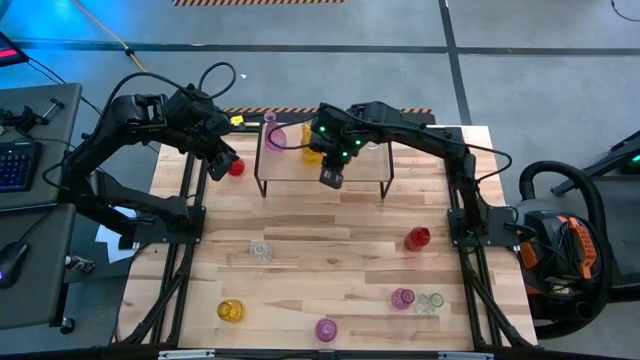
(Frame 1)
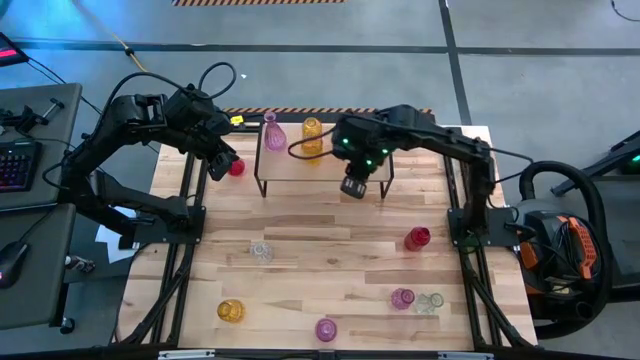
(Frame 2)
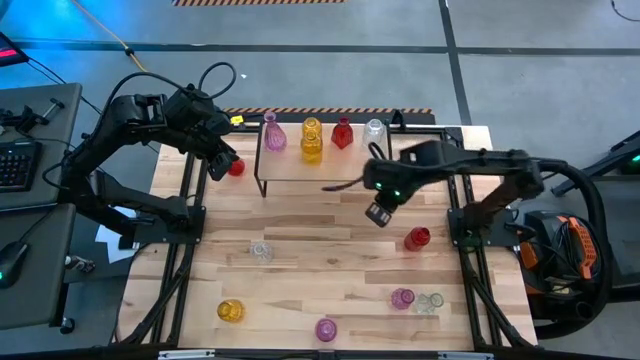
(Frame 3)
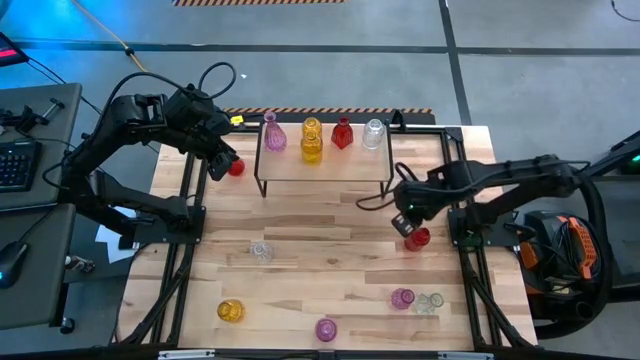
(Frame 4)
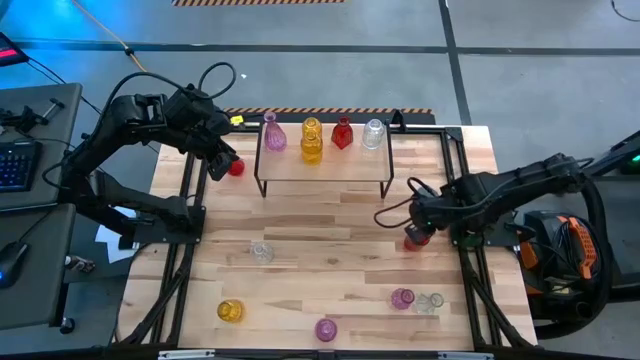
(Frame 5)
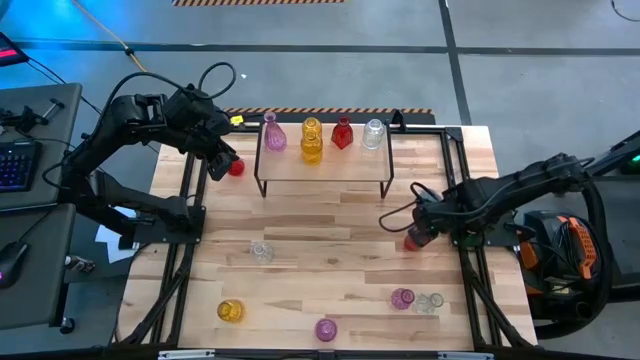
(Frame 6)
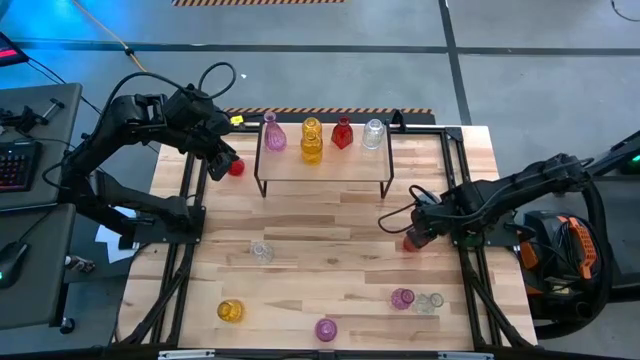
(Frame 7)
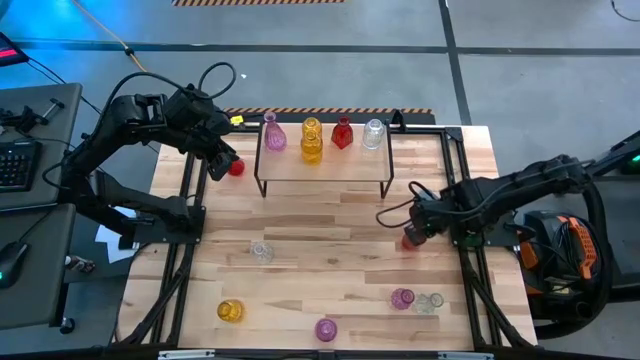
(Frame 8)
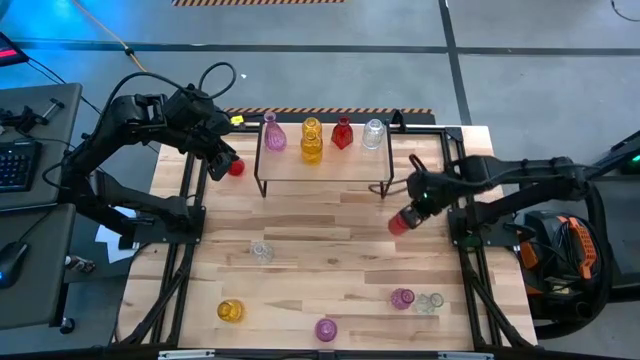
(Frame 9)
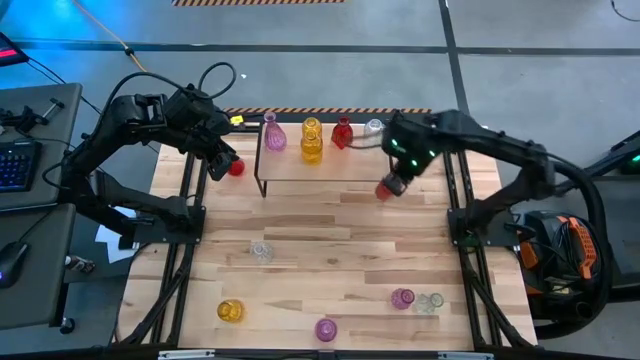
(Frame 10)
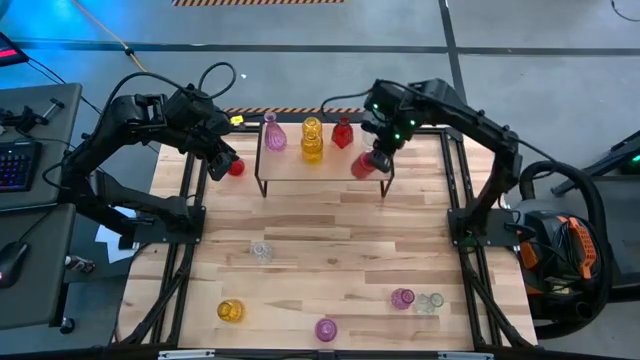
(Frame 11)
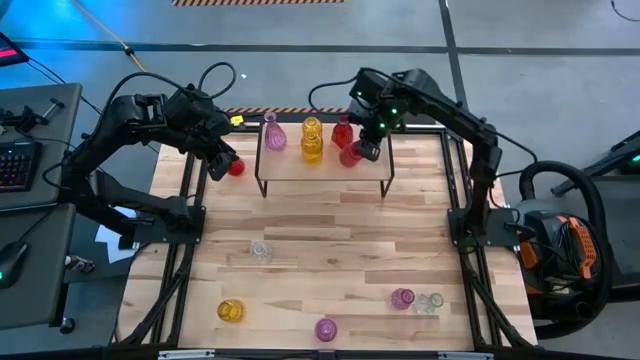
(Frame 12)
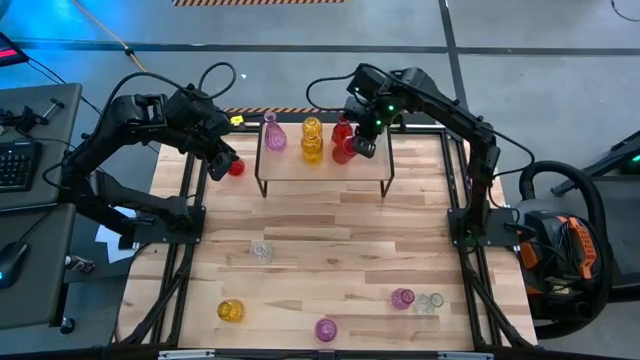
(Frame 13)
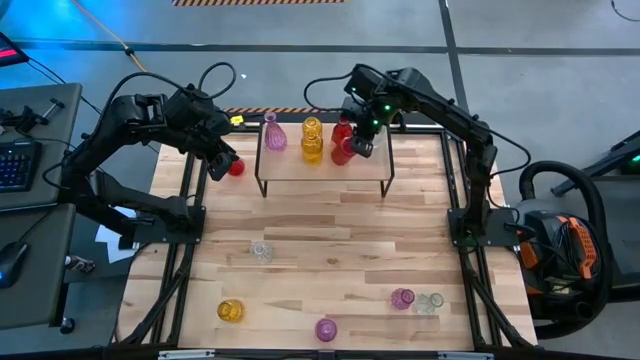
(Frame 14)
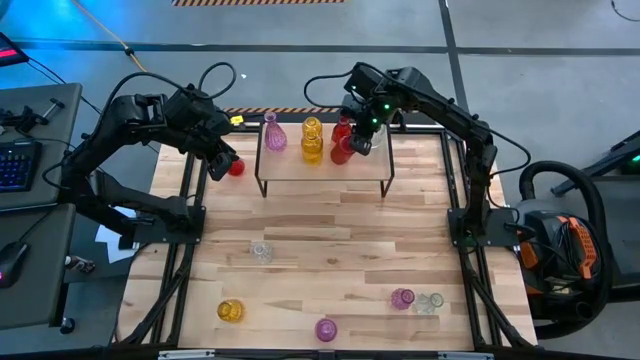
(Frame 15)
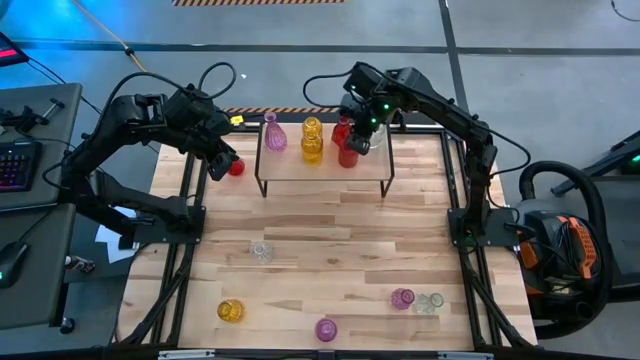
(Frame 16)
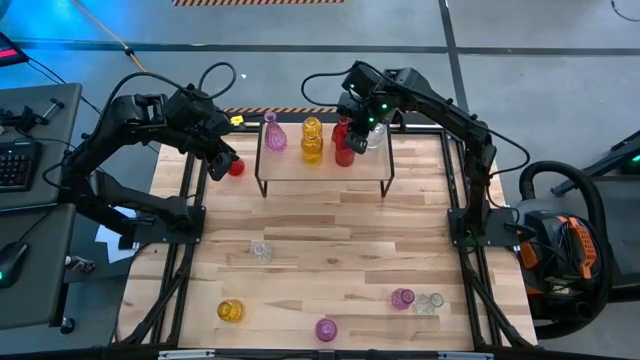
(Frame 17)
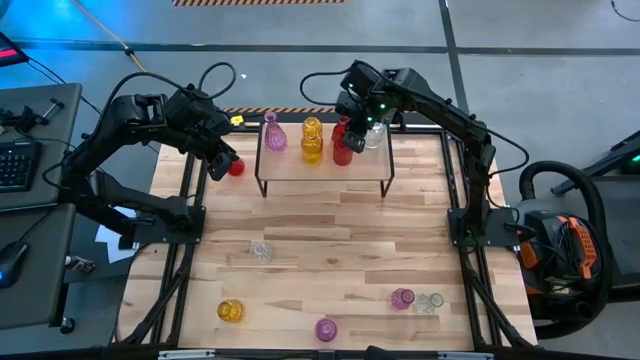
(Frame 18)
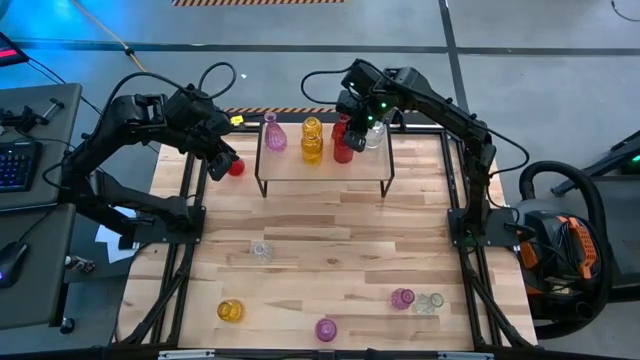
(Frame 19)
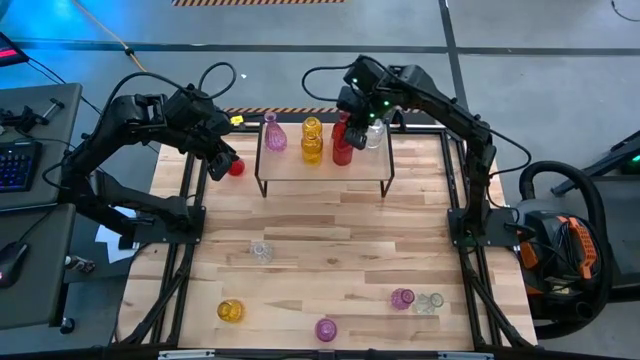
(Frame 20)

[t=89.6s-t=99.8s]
Task: sort vases onto shelf
Put the right red vase on the shelf aligned with the other red vase

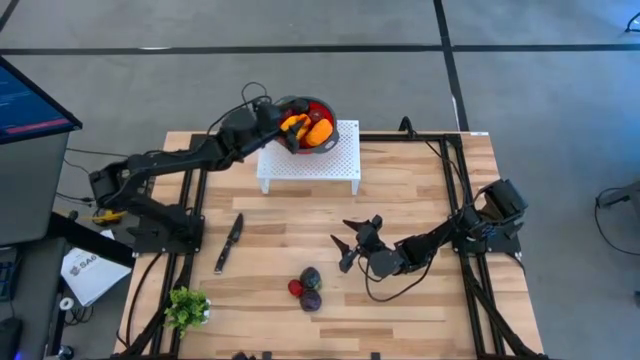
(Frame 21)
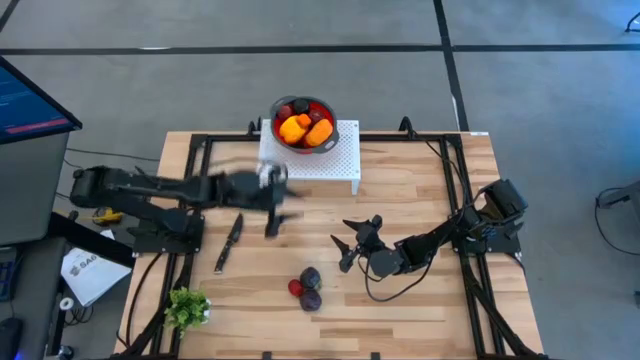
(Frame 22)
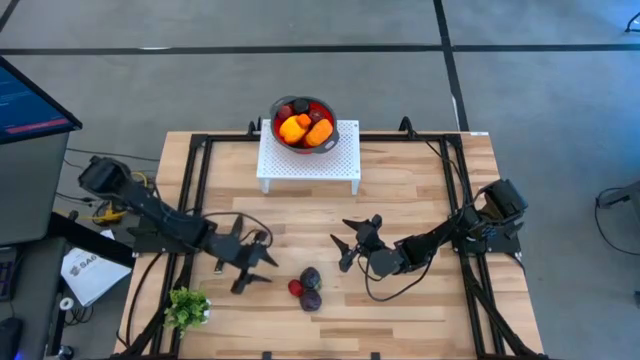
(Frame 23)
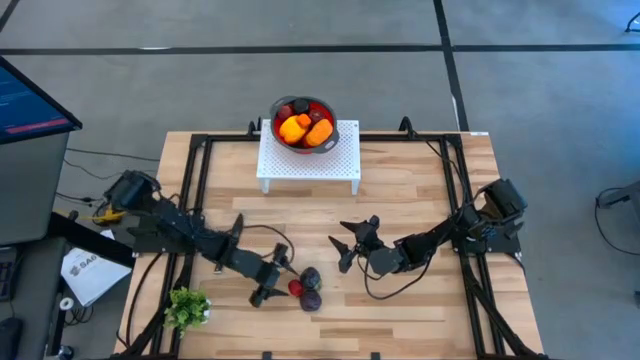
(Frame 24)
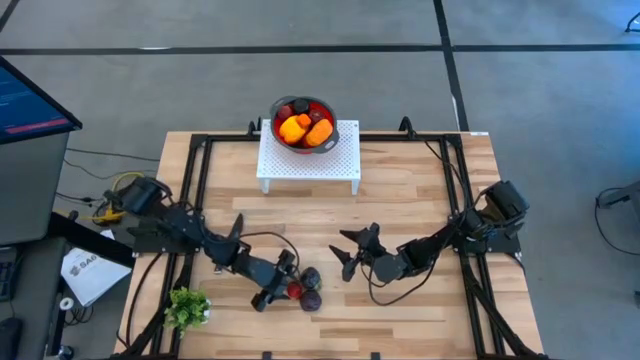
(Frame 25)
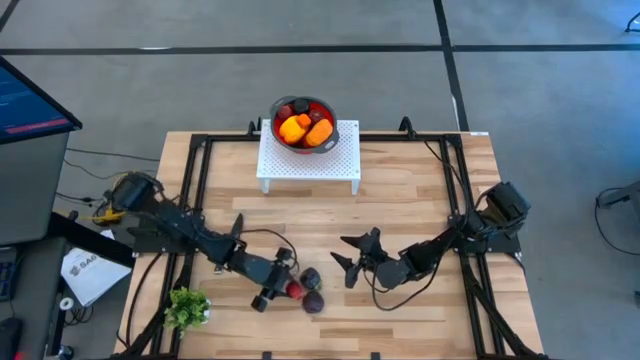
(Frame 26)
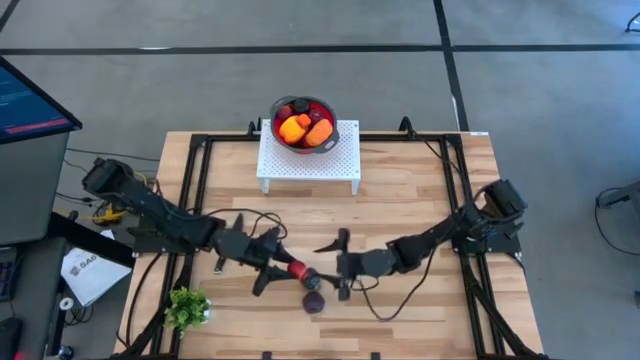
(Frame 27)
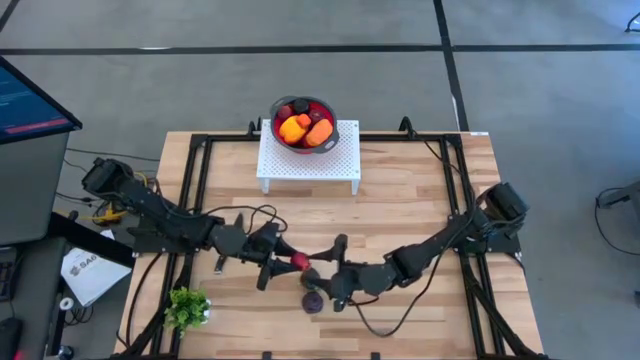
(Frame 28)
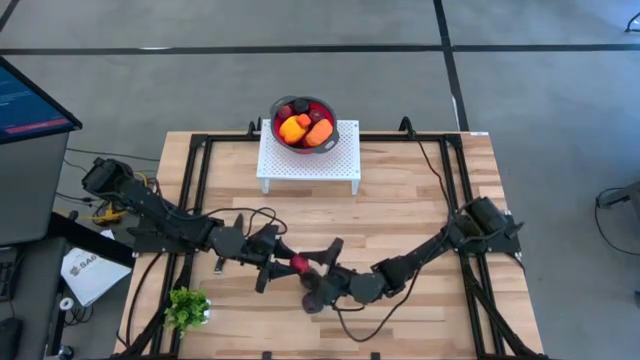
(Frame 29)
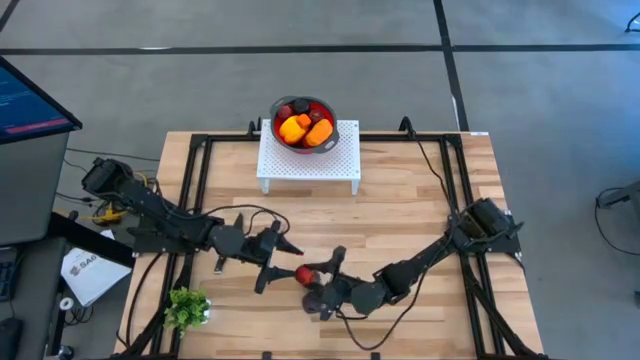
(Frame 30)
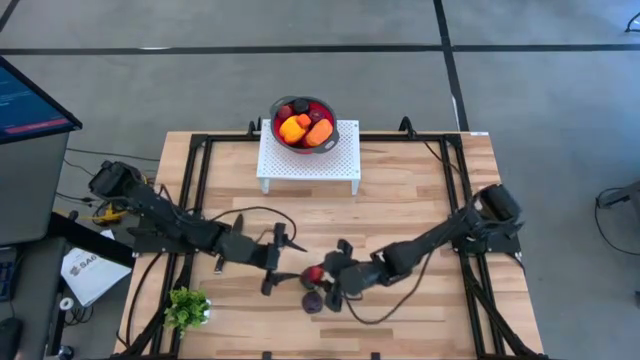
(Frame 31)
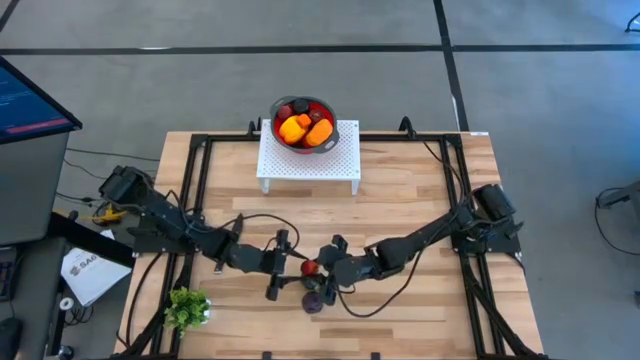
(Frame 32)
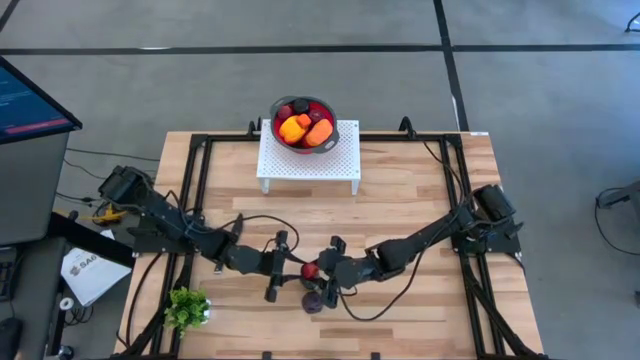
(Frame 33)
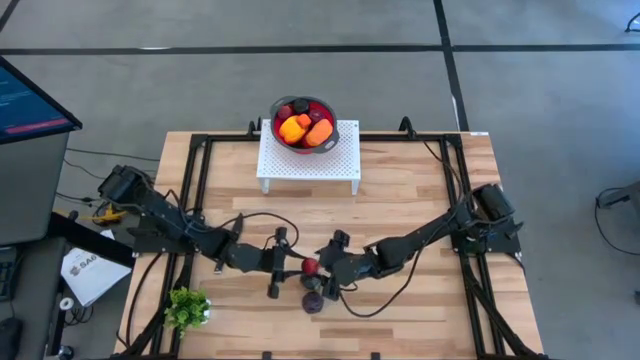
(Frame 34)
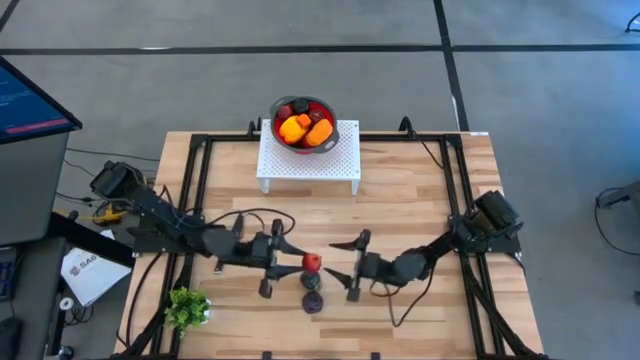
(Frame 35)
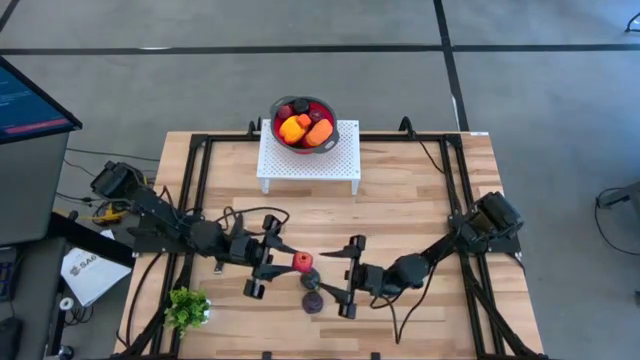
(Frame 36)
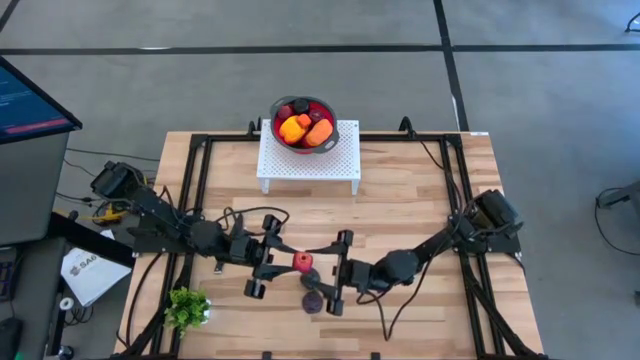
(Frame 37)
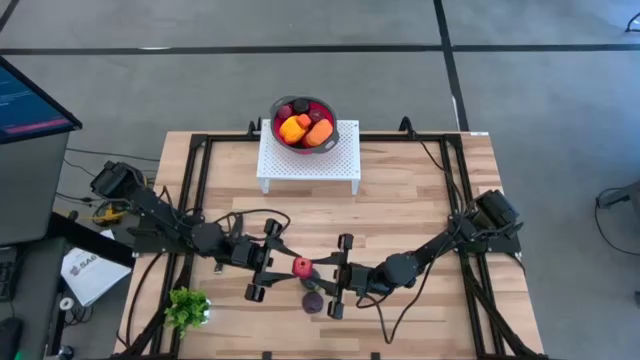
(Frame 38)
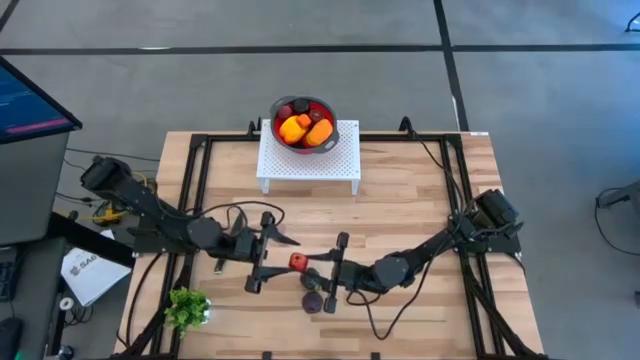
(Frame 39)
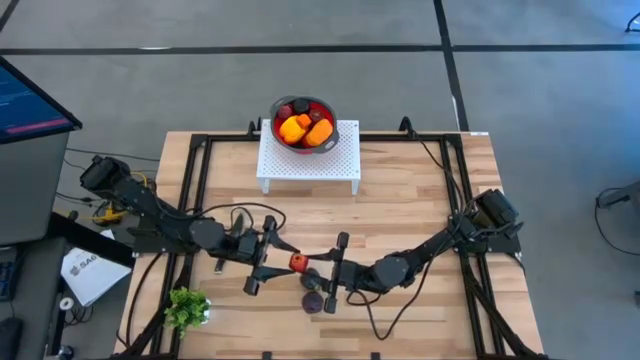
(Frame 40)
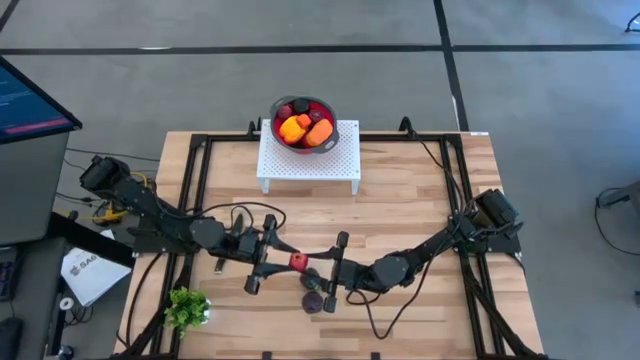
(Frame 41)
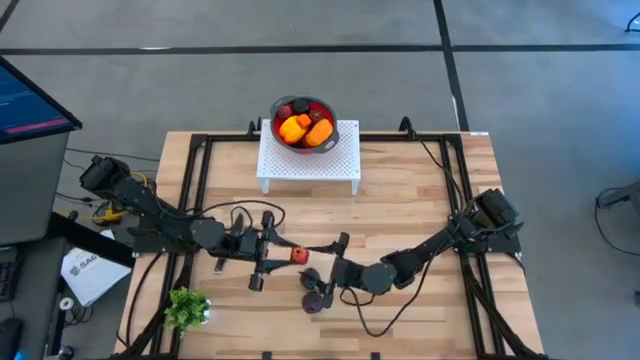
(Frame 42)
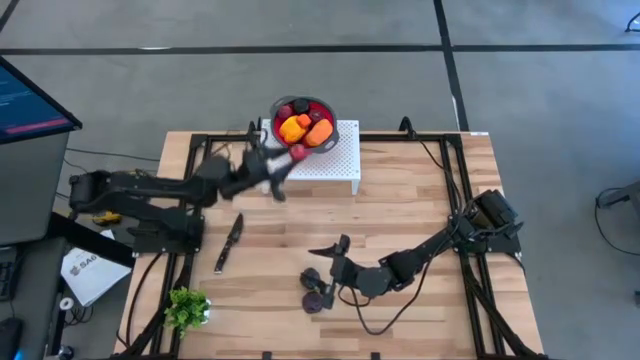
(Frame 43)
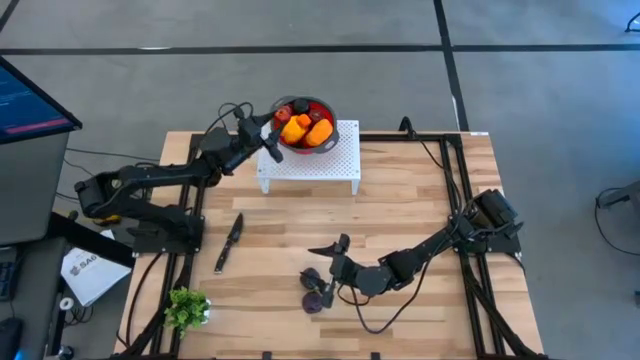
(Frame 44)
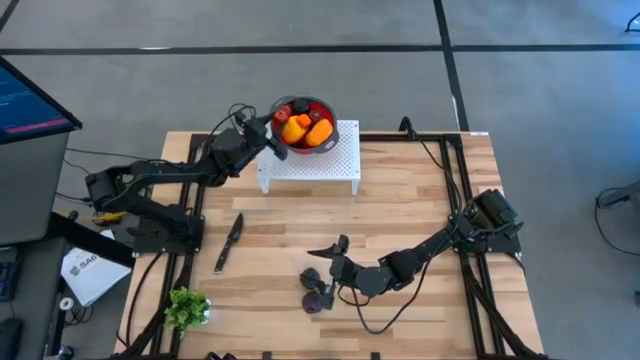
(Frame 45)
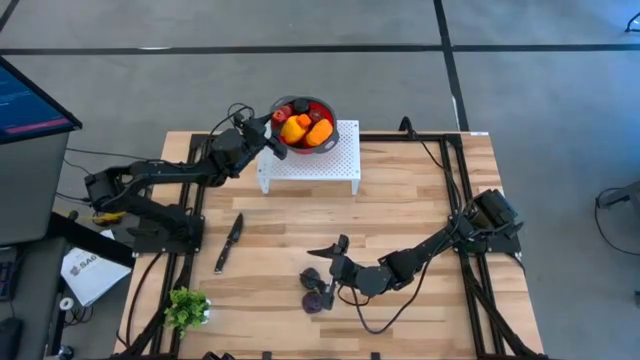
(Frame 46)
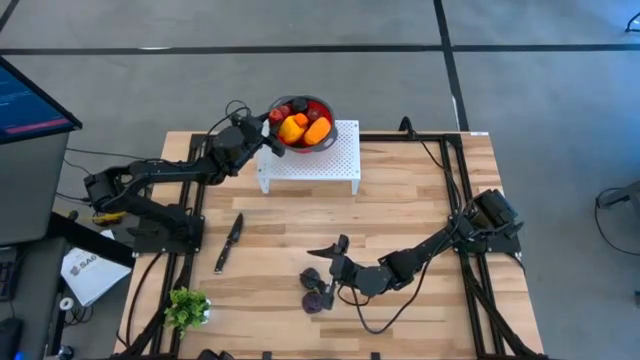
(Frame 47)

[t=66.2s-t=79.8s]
Task: Pick & Place Fruit
Put the red pomegranate into the red strainer bowl on the shelf
